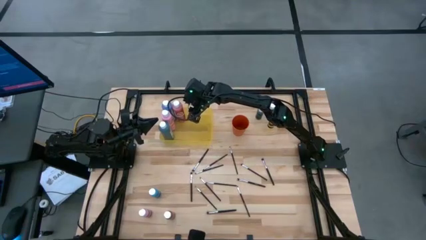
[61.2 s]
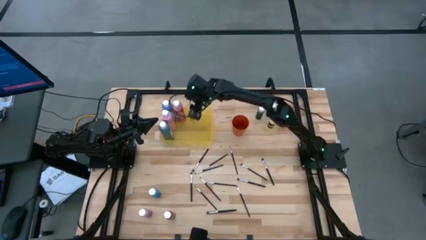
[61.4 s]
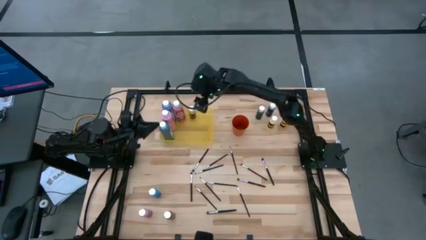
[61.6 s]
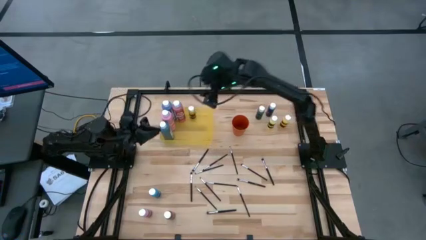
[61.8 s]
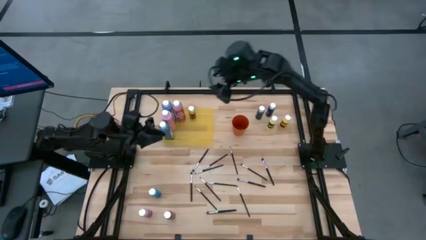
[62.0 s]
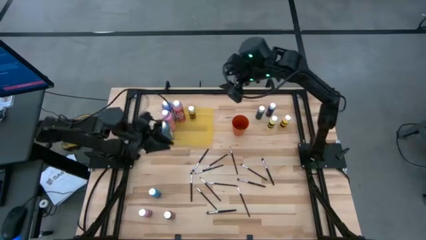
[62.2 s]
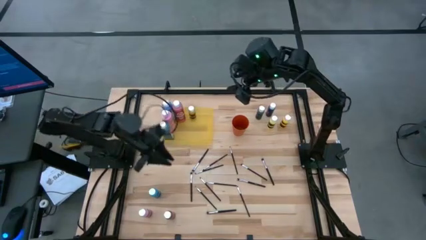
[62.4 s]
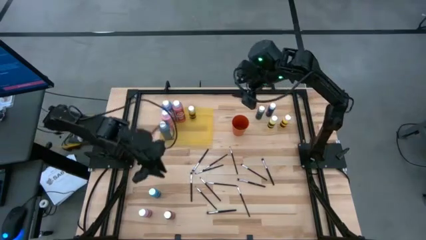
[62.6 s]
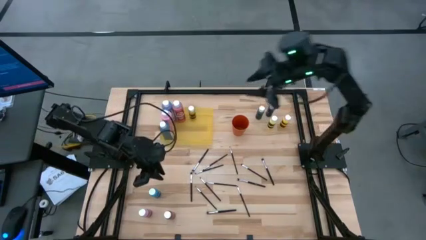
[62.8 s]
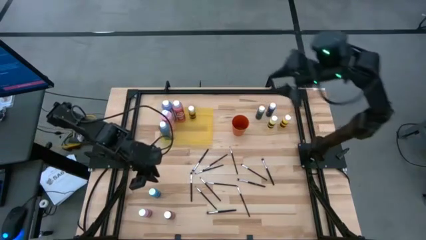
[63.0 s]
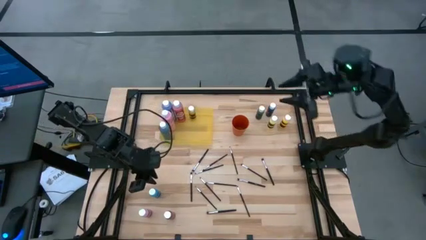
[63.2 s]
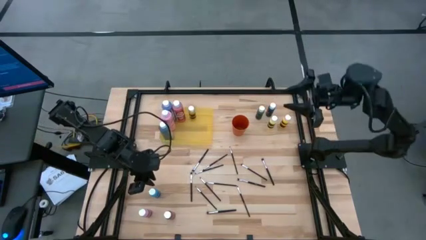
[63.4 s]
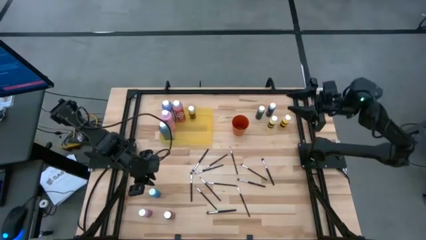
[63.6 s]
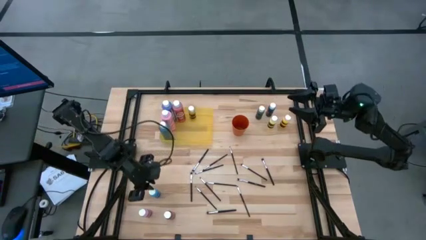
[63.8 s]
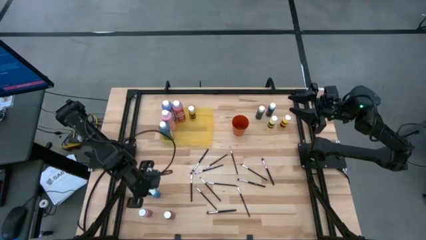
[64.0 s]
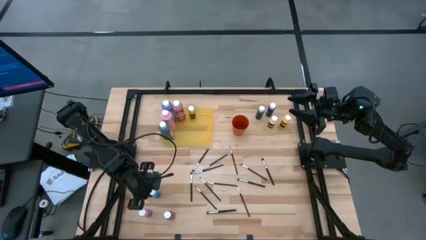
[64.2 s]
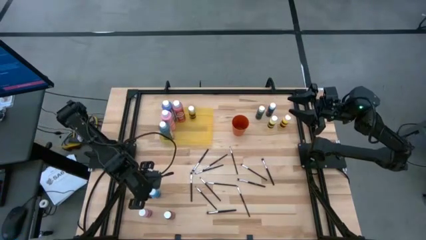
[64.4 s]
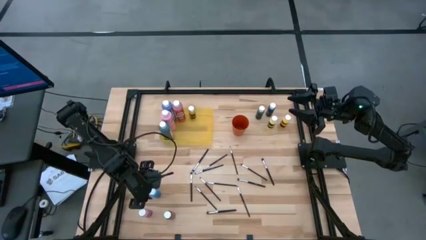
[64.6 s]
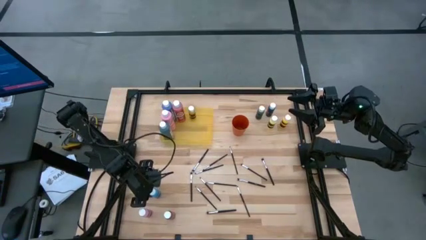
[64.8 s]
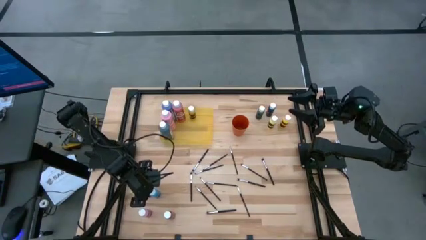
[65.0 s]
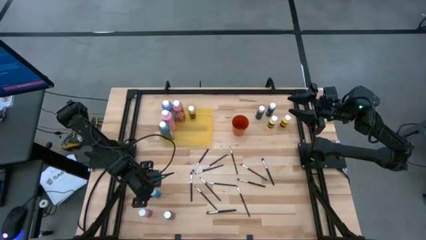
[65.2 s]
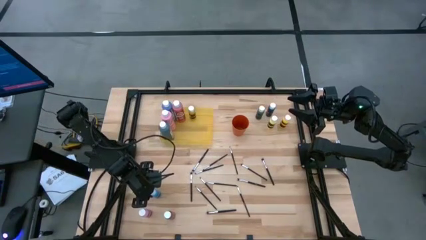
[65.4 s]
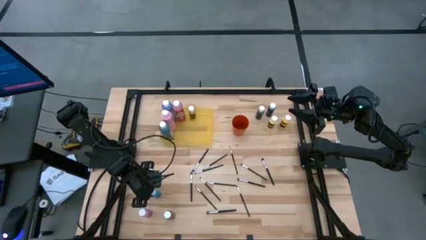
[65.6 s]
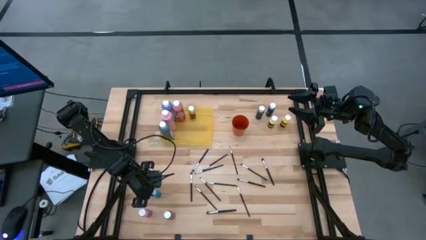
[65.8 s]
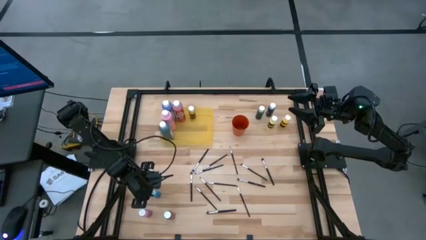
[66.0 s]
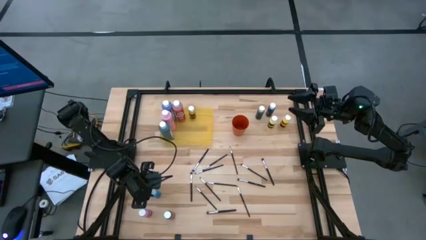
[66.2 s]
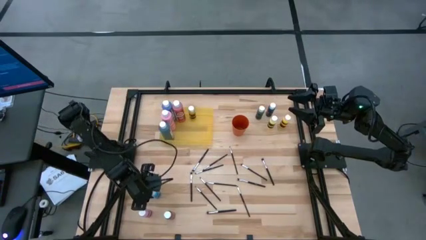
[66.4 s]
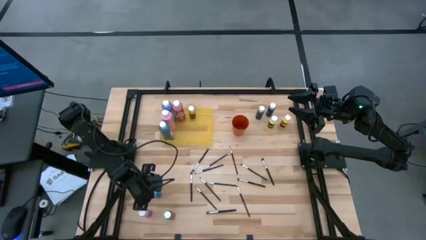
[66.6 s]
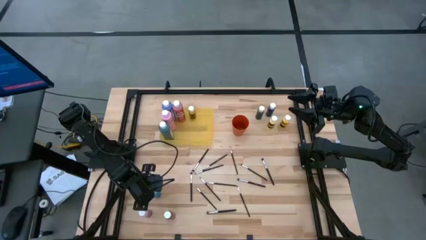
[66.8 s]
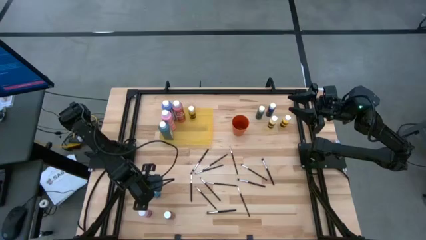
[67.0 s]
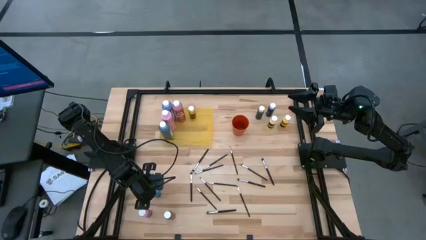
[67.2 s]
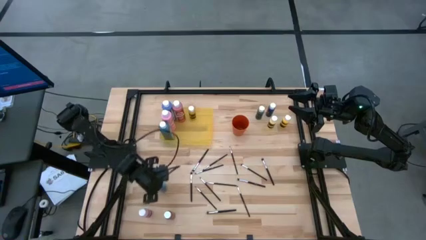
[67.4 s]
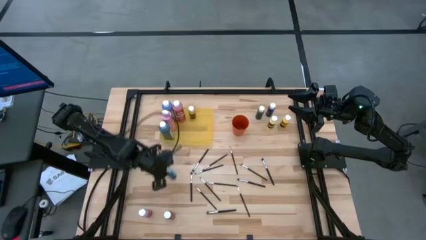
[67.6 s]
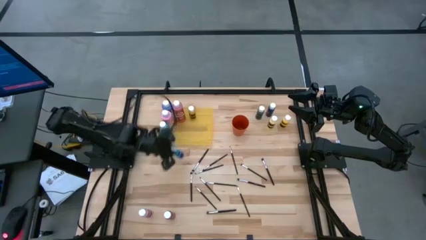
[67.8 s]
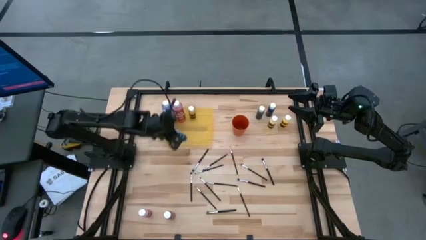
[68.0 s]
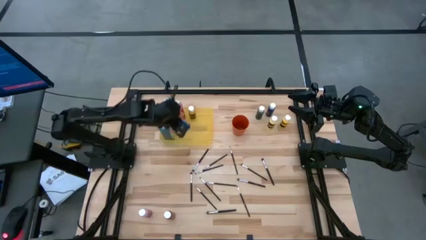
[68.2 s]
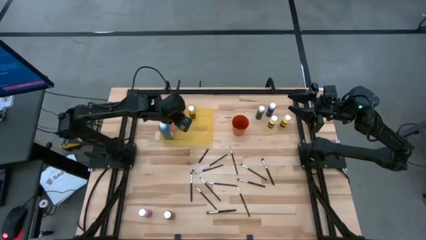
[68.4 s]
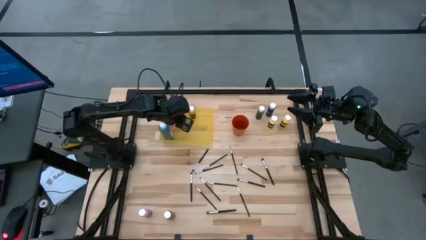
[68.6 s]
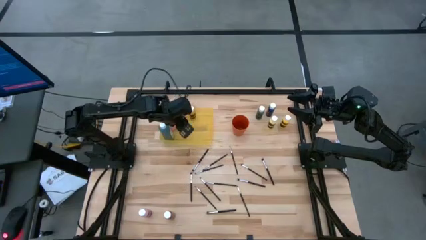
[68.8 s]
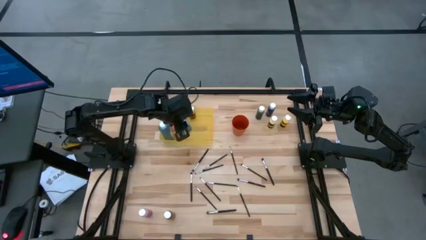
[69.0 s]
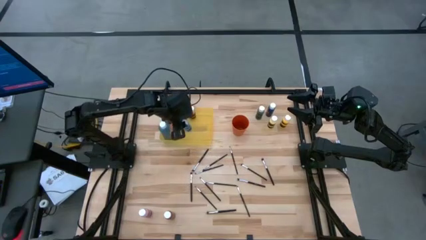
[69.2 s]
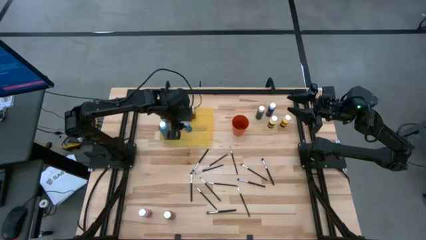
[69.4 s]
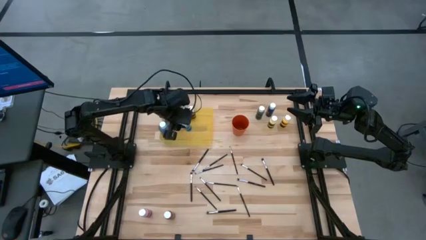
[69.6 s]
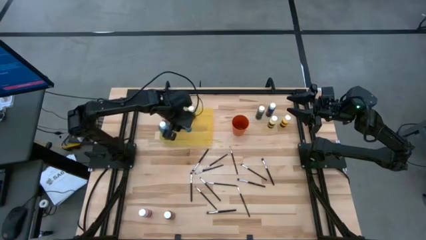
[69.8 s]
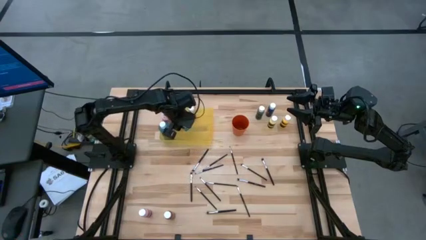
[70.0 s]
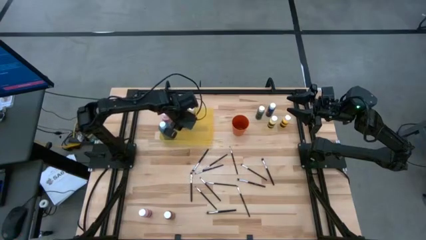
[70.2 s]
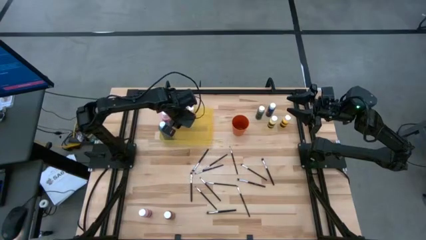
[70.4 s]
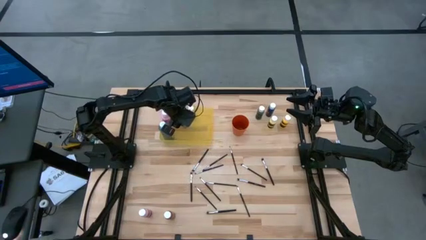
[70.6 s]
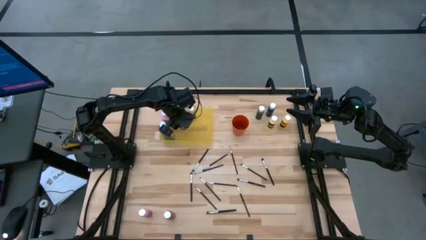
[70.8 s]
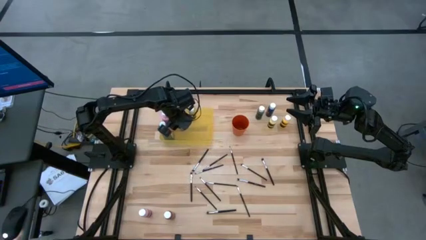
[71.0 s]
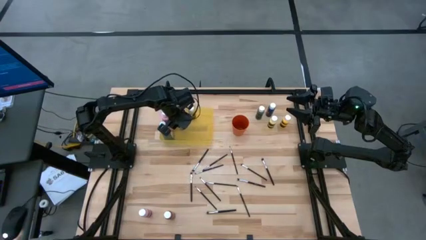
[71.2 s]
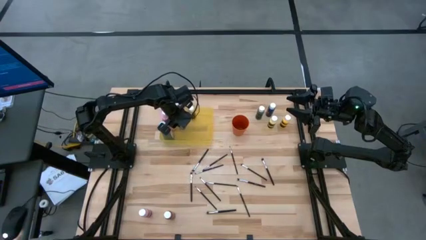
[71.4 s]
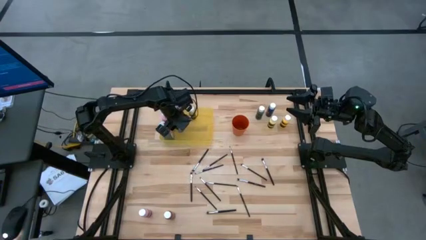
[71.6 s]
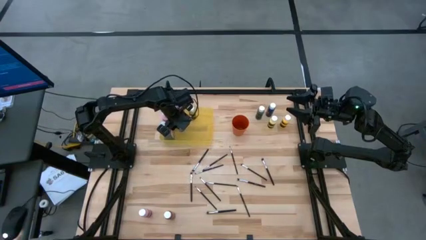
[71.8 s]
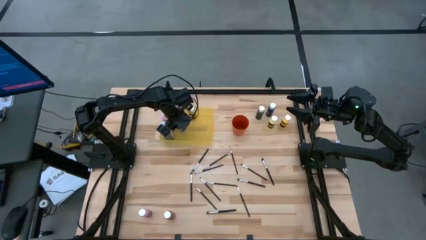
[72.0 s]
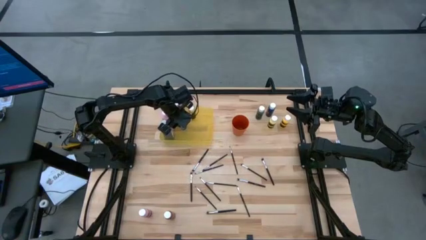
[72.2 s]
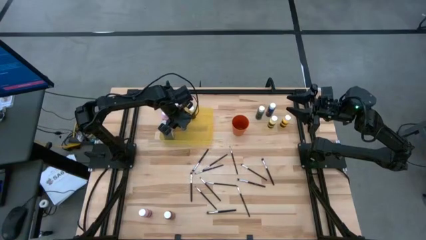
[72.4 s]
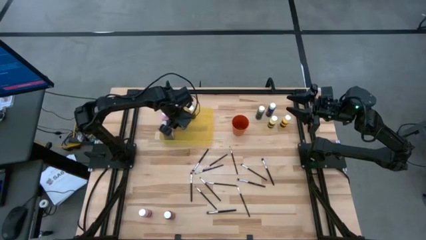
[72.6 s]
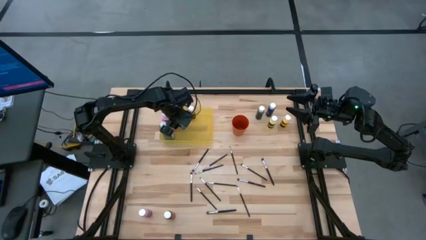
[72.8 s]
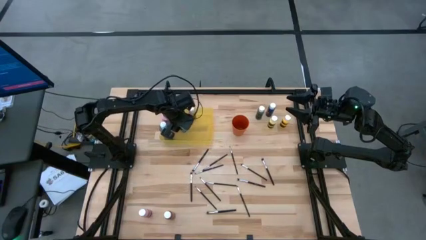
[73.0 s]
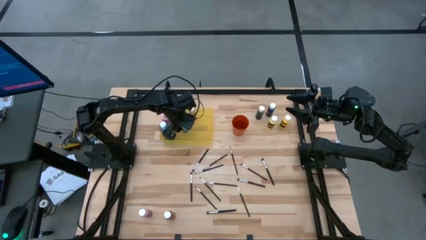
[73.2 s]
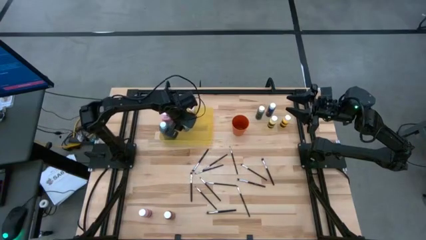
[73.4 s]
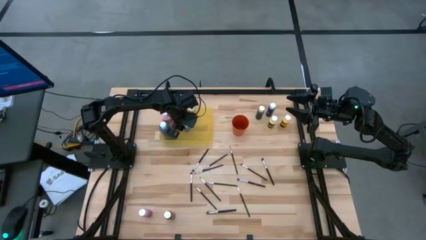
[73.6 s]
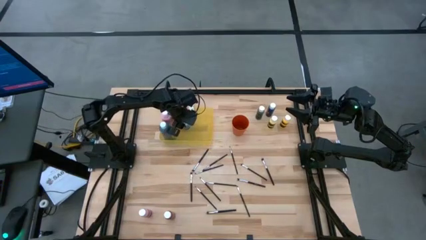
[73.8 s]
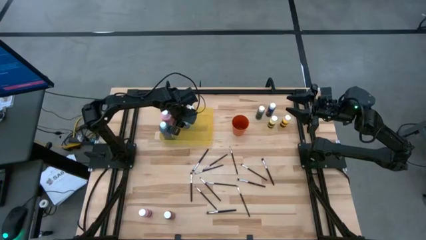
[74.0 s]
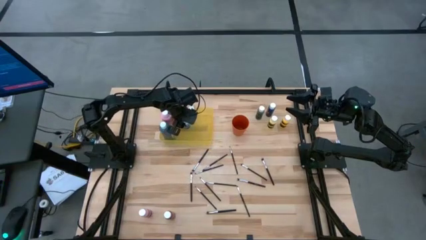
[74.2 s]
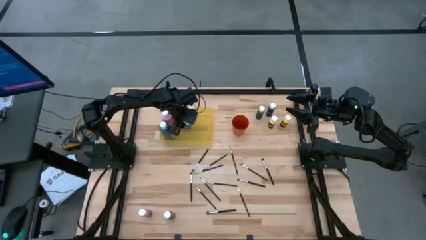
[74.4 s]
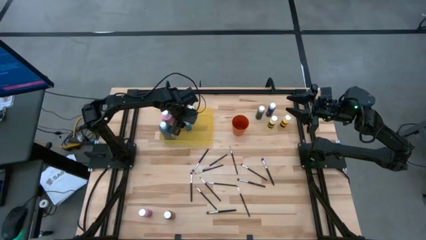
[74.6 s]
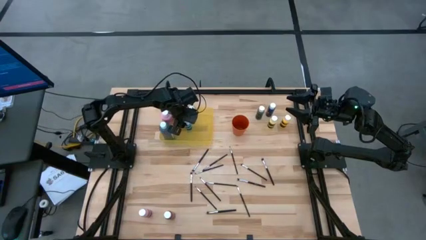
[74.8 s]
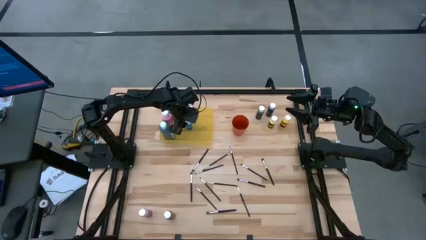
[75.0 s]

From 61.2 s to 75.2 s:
Task: Pick & Place Paint Supplies
Put the blue paint bottle into the yellow bin
